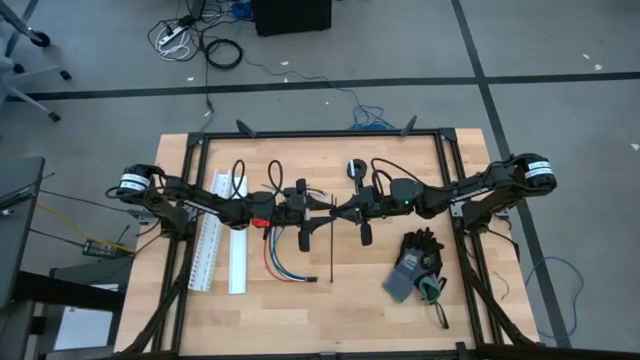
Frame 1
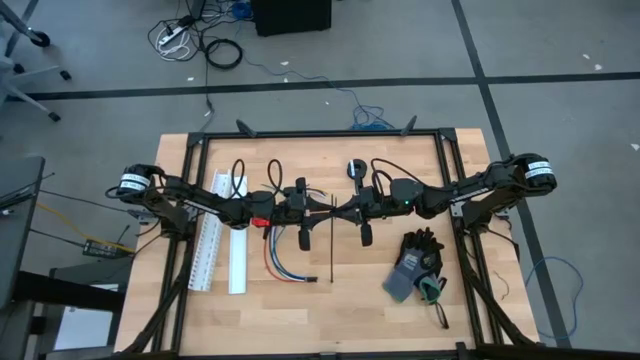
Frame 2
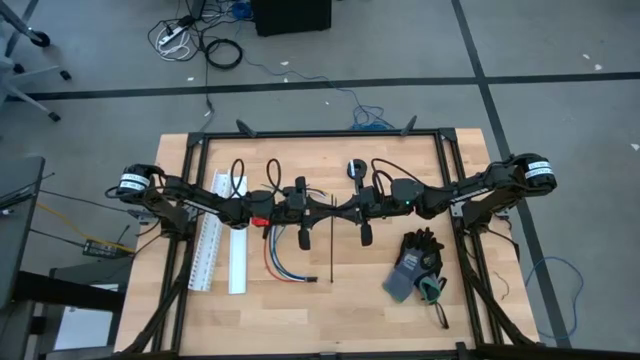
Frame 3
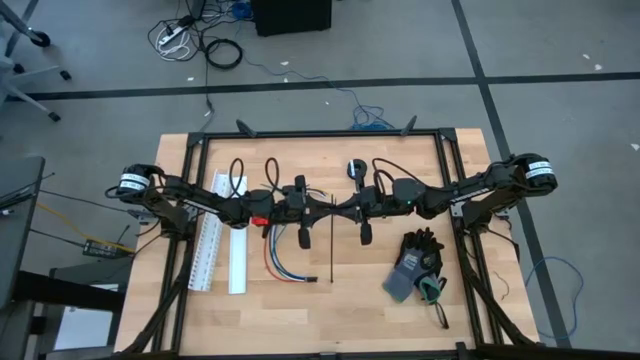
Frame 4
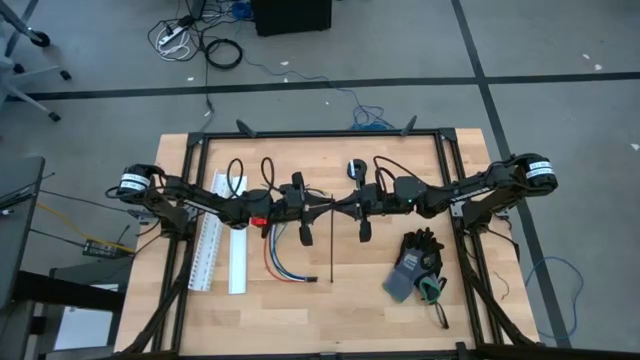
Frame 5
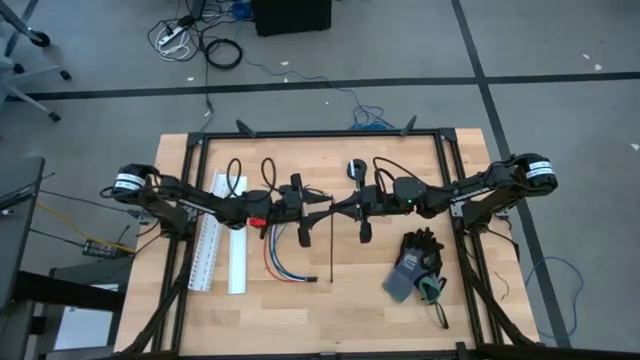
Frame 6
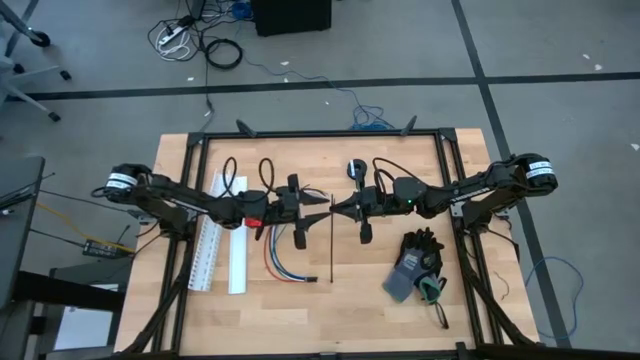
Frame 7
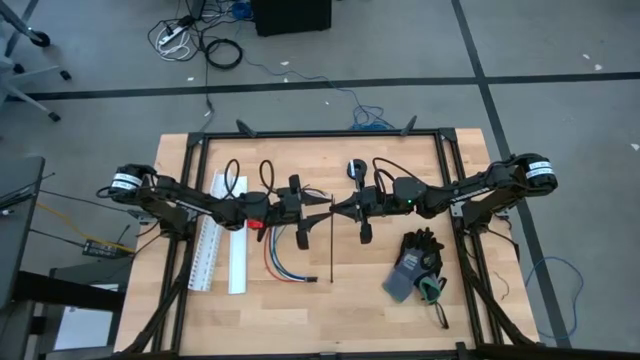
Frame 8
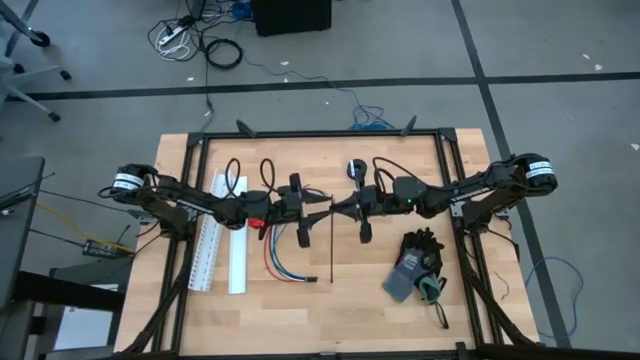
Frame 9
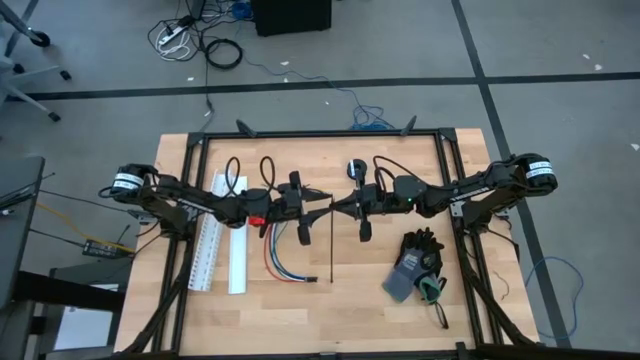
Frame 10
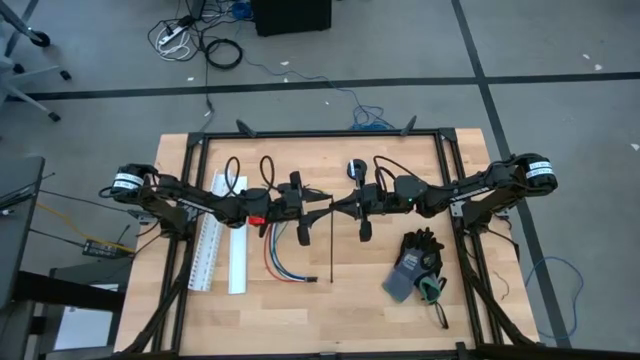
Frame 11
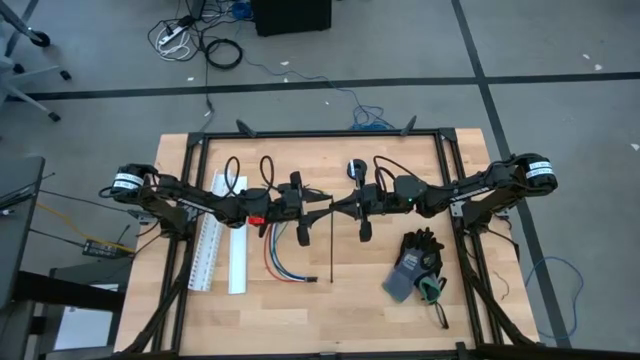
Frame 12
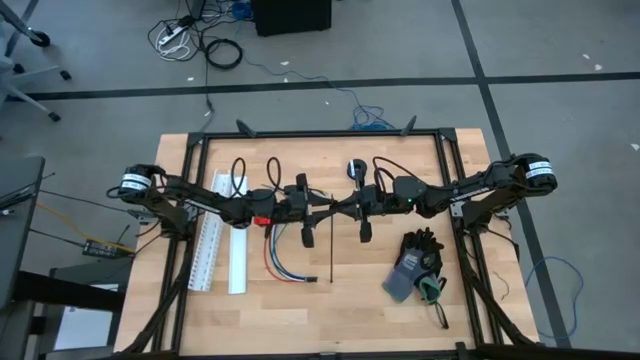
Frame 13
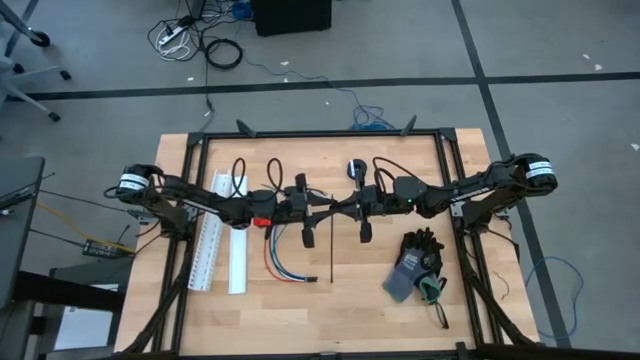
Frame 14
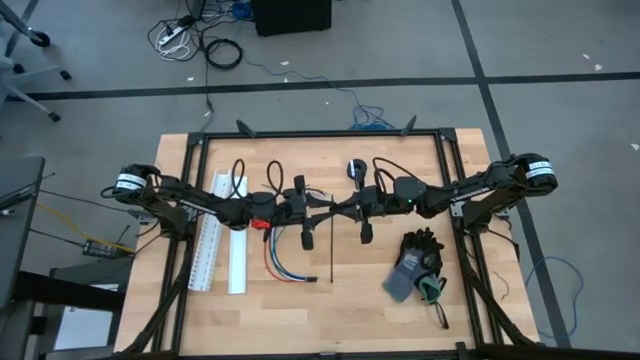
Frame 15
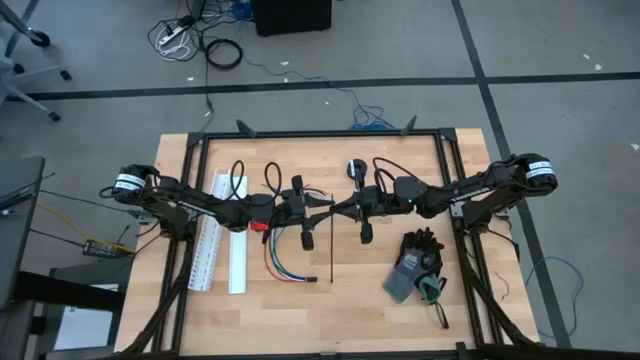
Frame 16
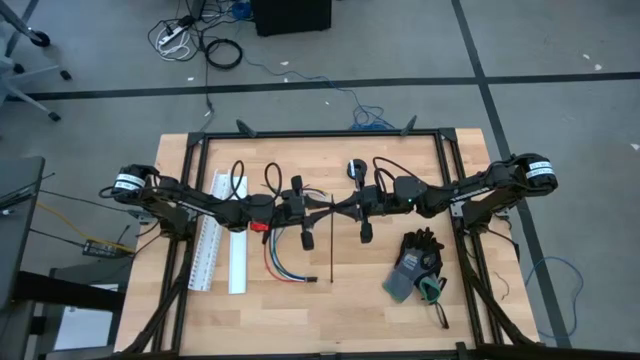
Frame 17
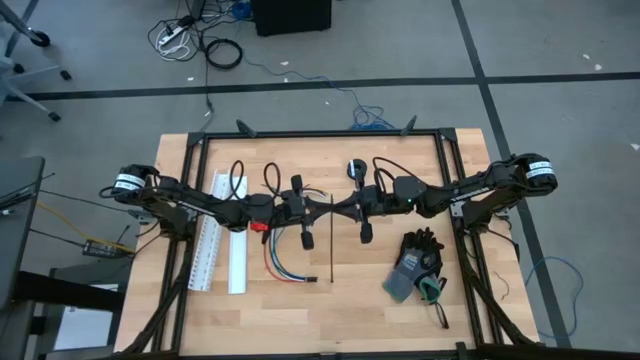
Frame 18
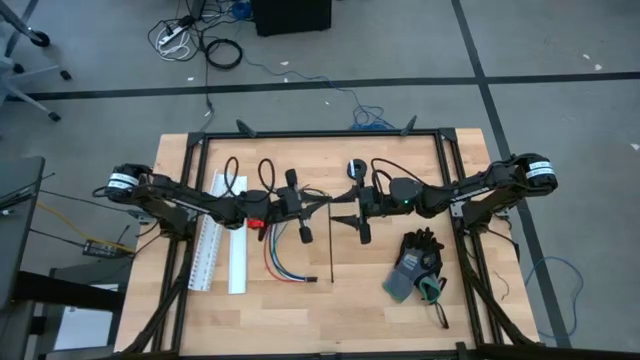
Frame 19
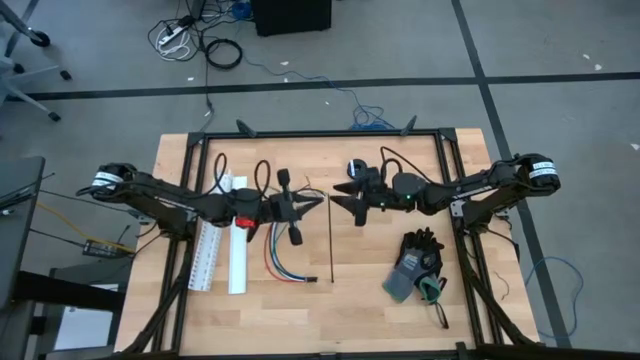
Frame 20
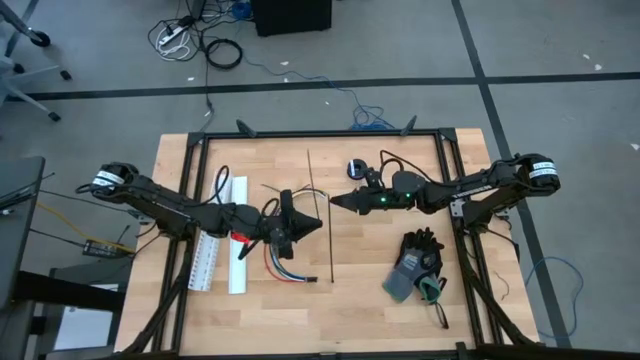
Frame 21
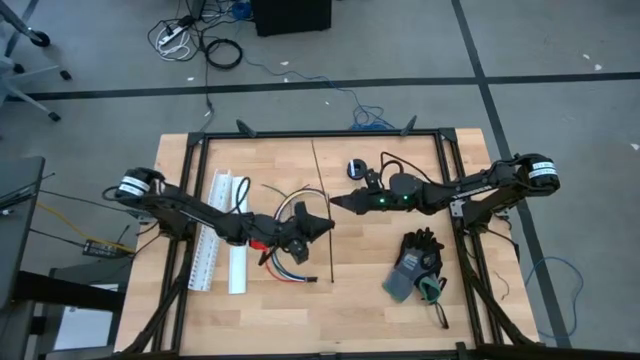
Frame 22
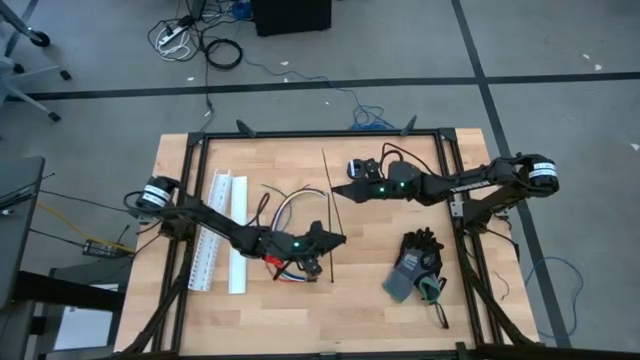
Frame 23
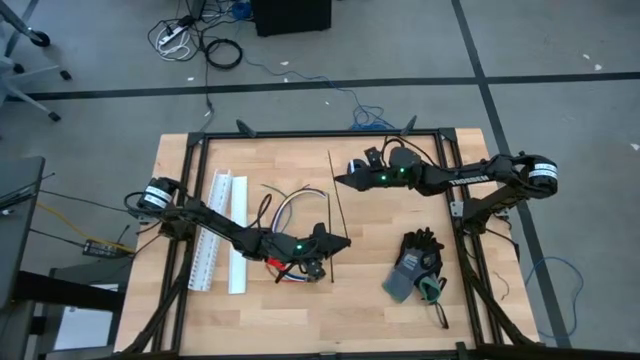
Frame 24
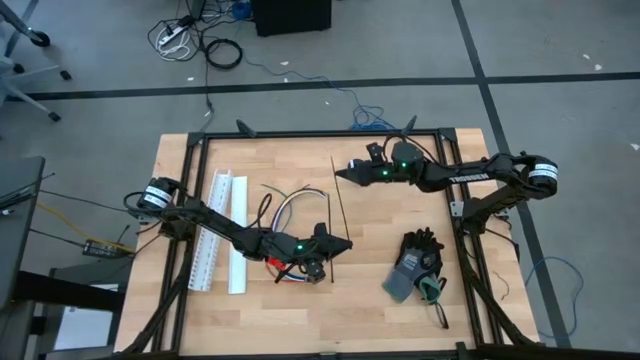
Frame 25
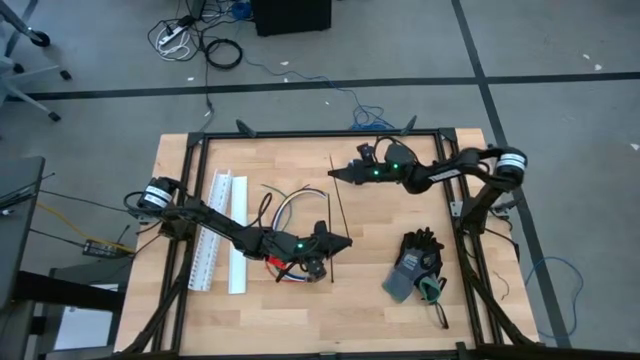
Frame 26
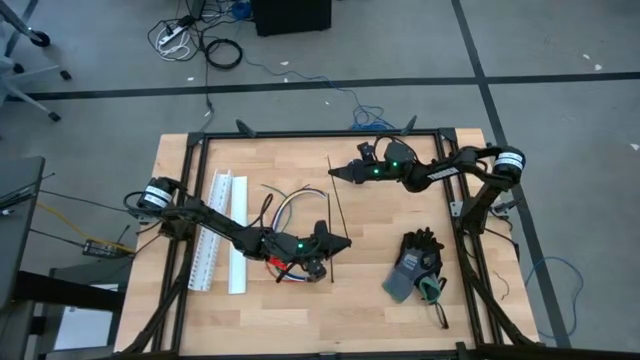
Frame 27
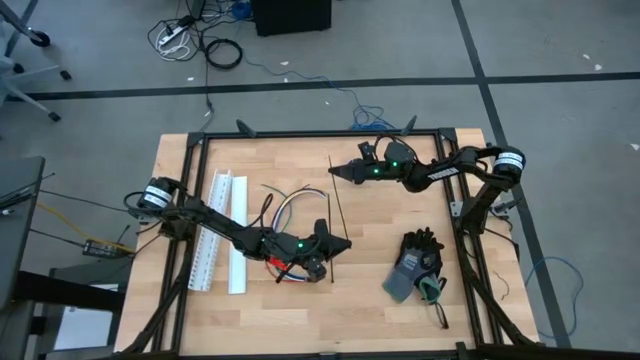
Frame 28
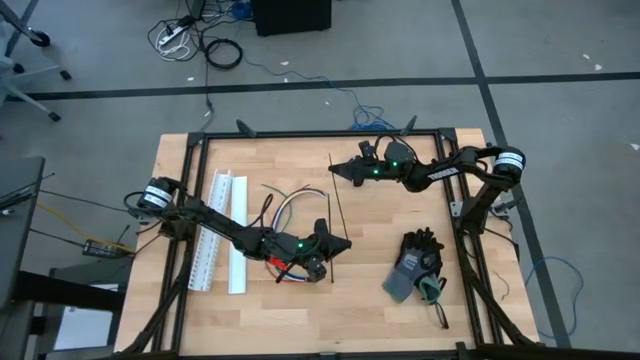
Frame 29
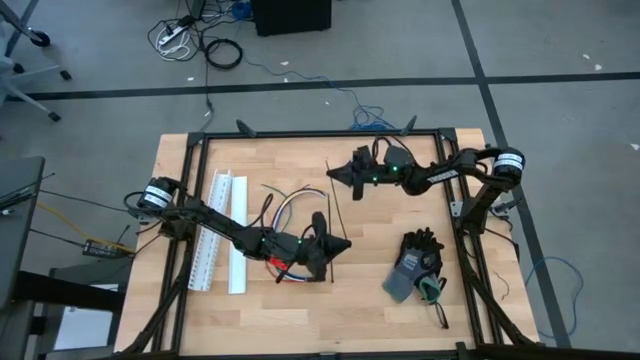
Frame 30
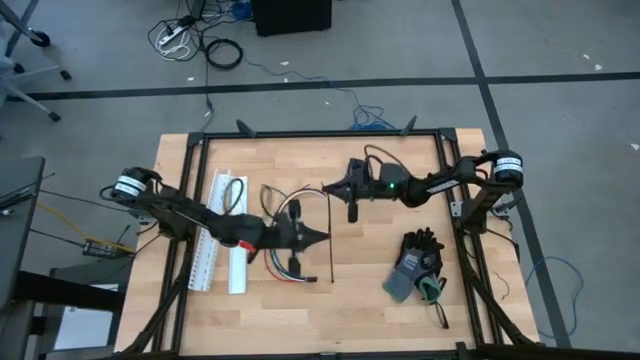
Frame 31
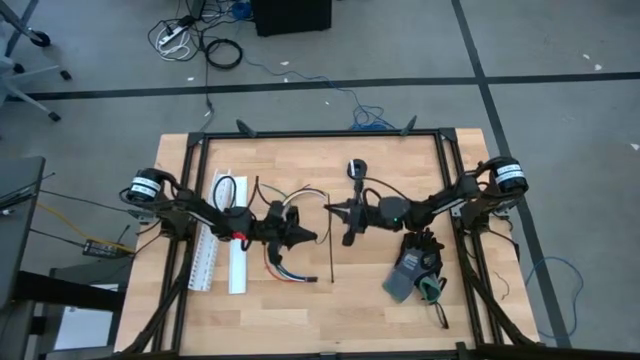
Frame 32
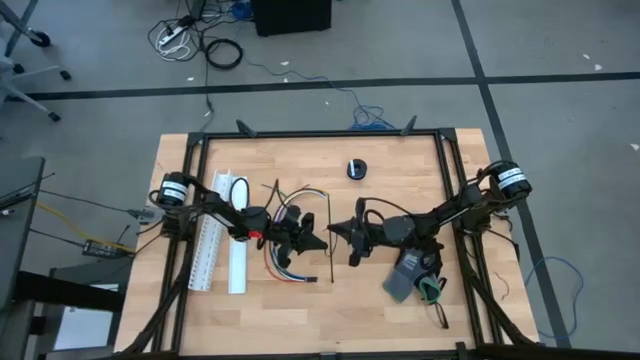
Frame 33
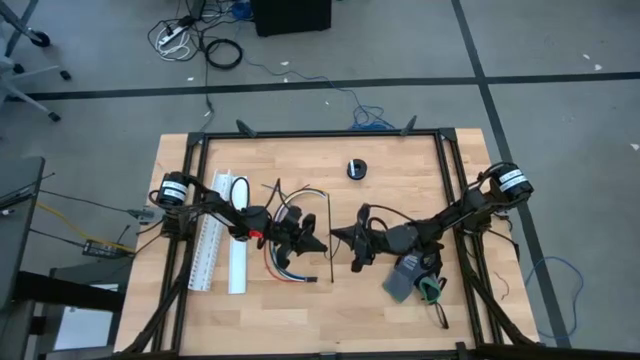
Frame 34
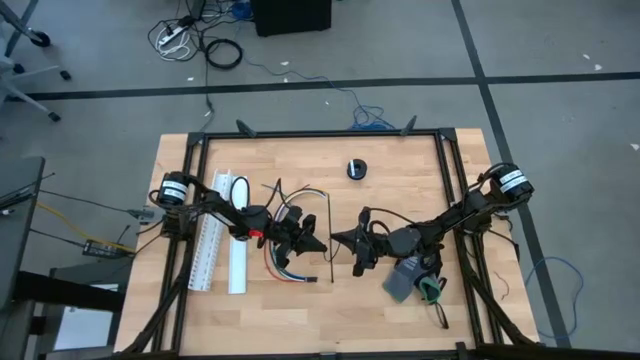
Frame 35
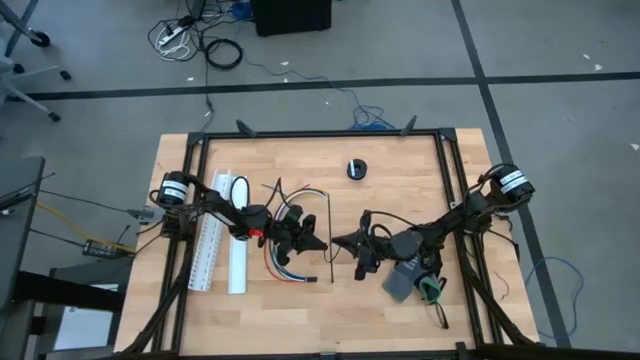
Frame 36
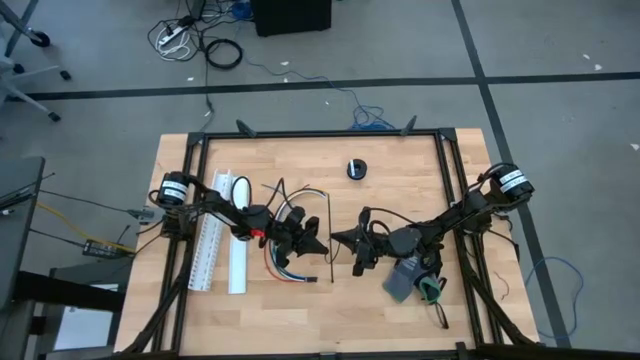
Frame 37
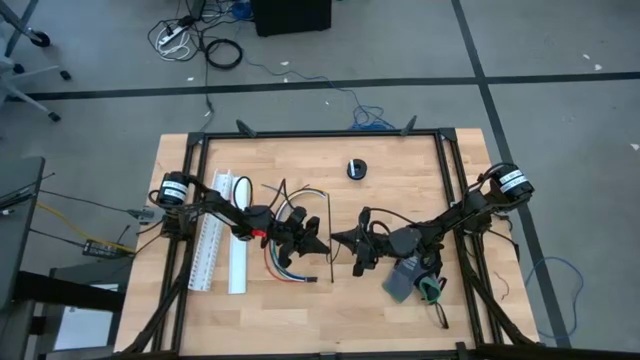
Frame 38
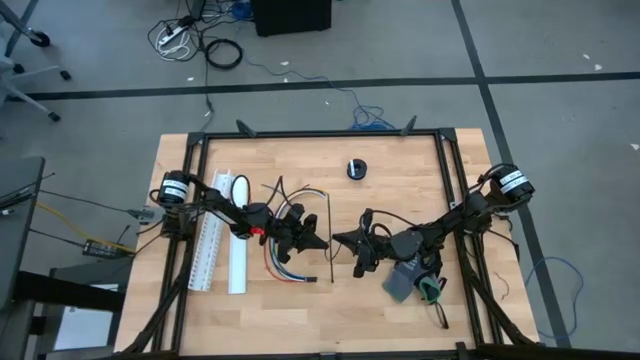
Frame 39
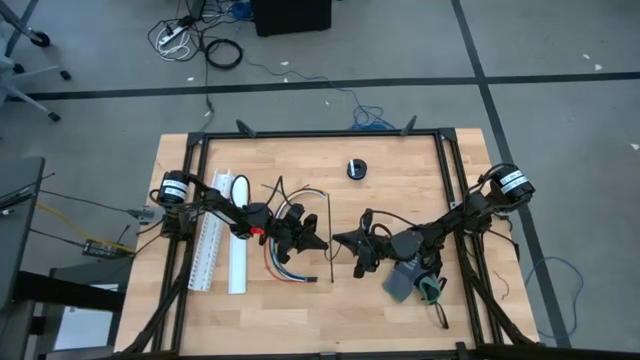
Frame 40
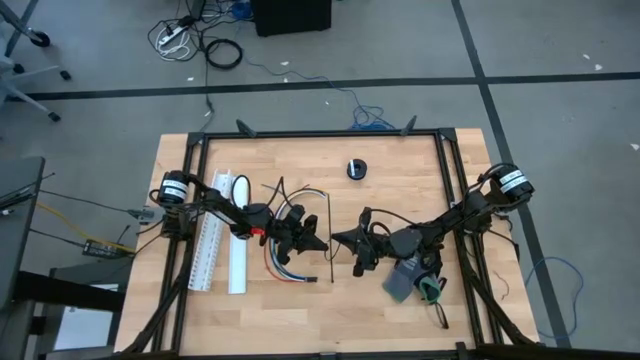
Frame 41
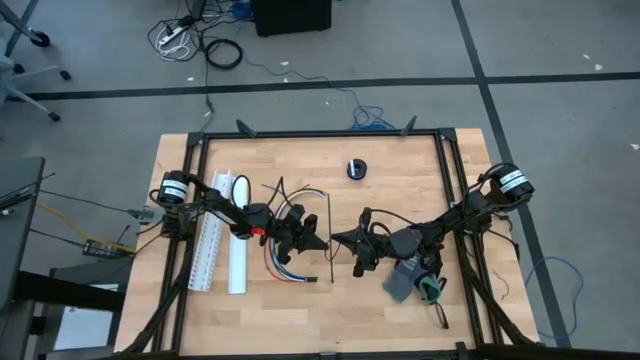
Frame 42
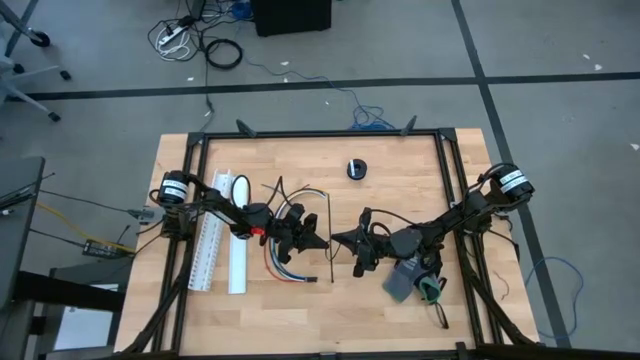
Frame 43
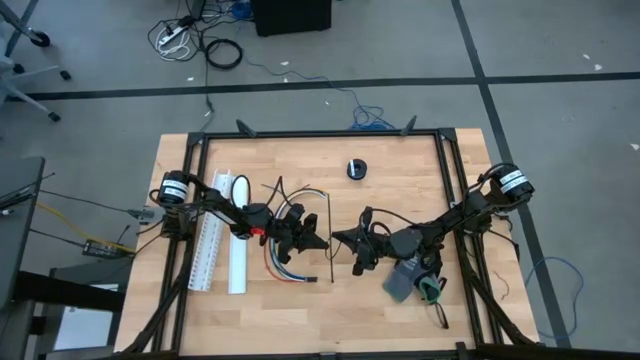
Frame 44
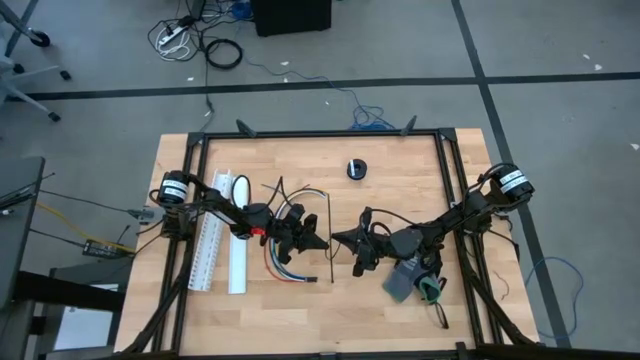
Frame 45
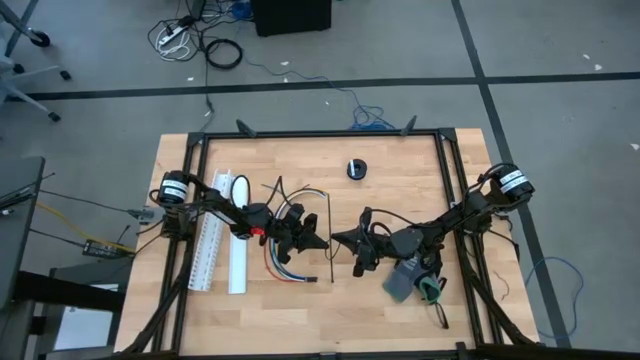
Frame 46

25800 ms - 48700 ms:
Task: Ziptie cables
Wrap the cables together using a ziptie
